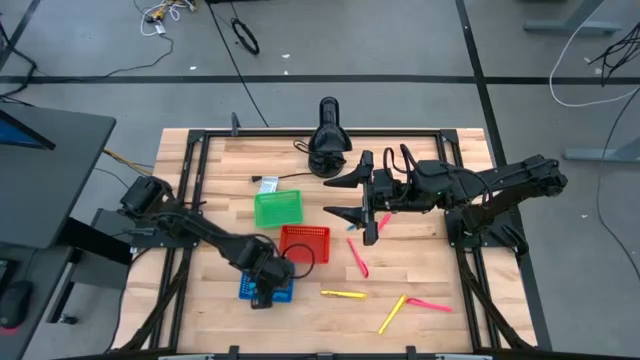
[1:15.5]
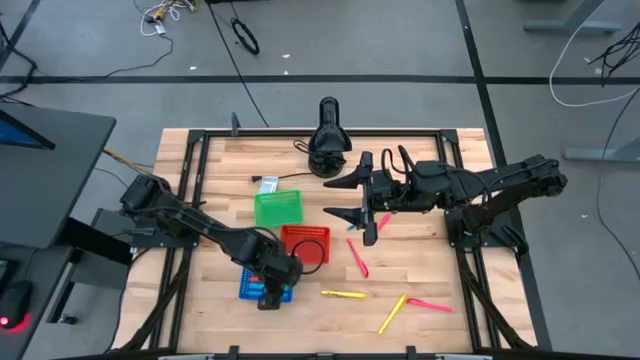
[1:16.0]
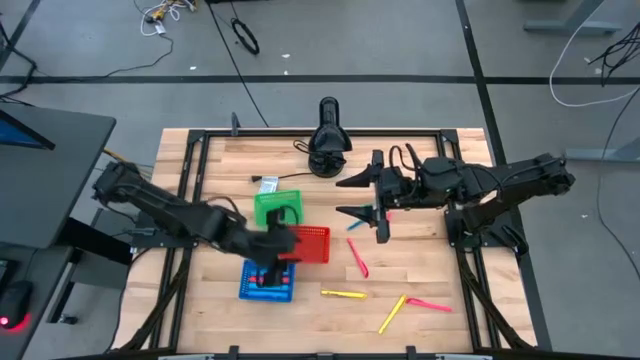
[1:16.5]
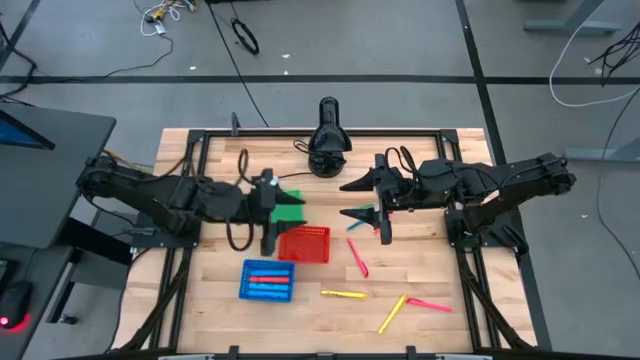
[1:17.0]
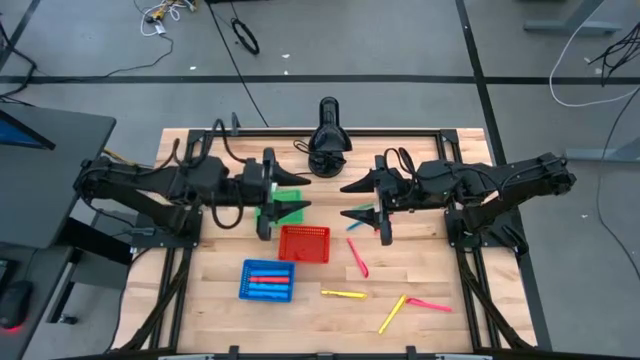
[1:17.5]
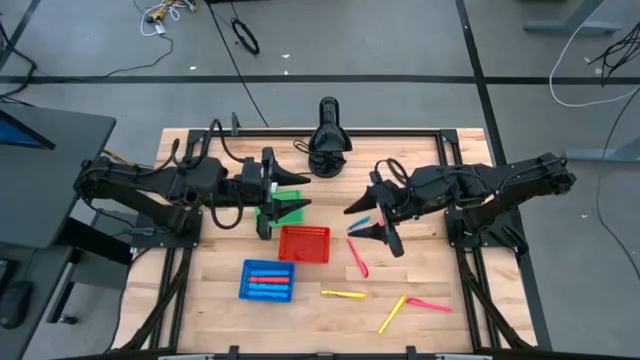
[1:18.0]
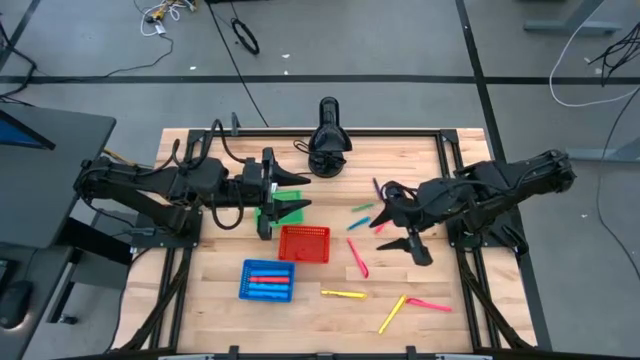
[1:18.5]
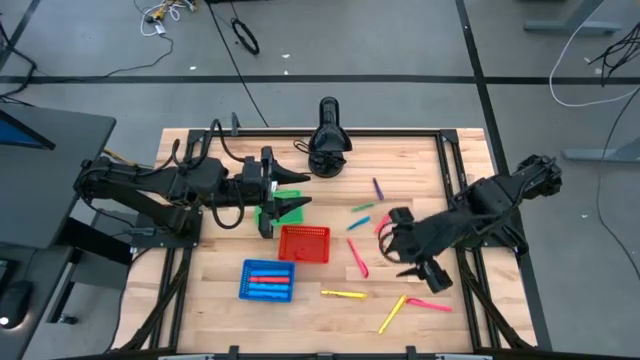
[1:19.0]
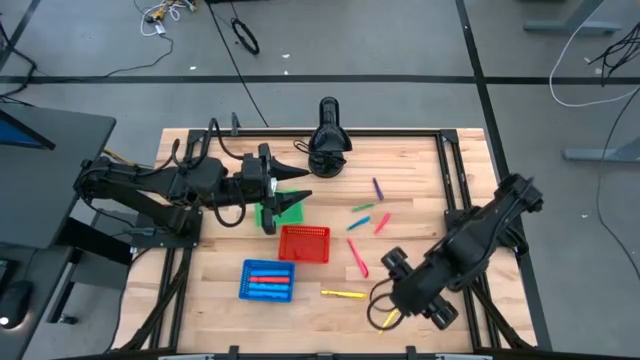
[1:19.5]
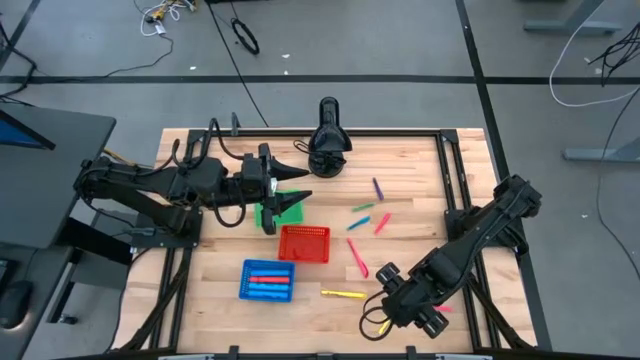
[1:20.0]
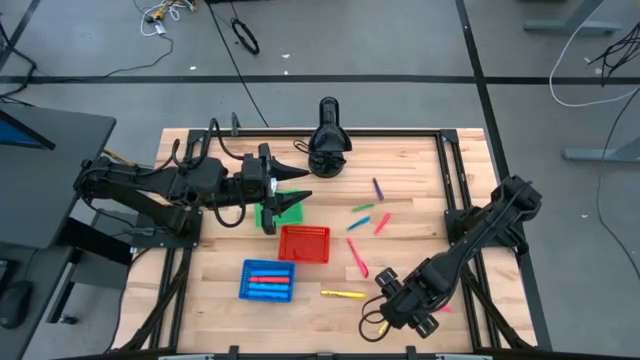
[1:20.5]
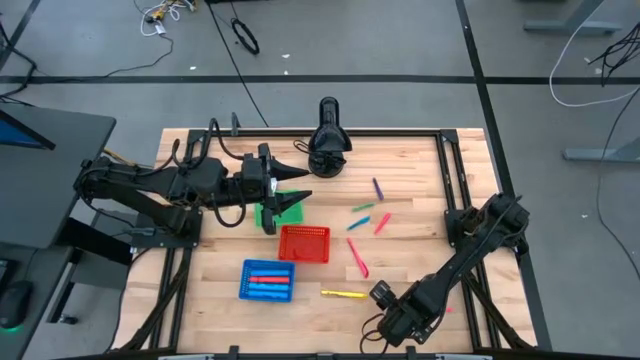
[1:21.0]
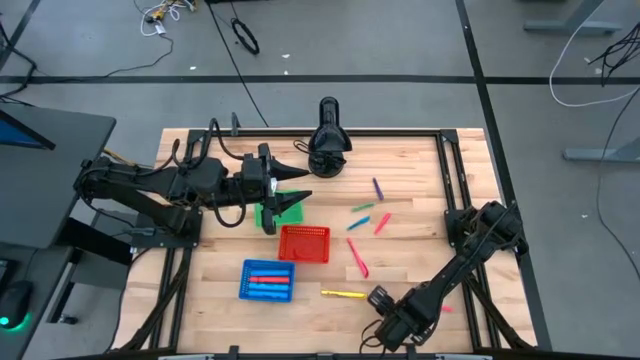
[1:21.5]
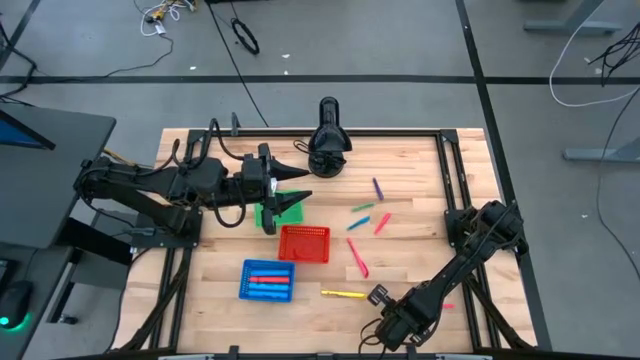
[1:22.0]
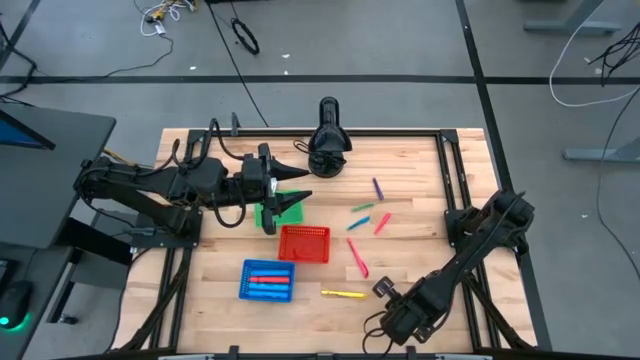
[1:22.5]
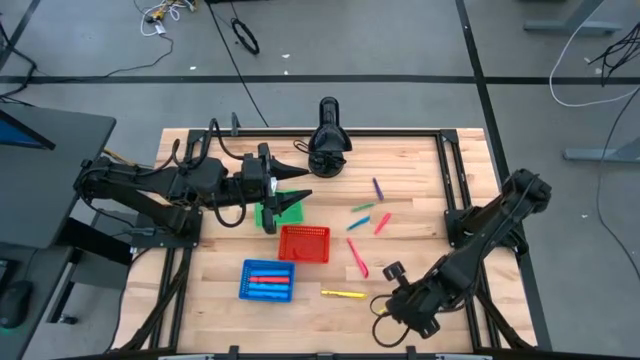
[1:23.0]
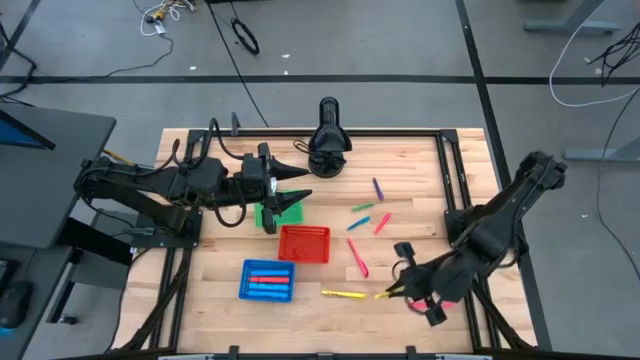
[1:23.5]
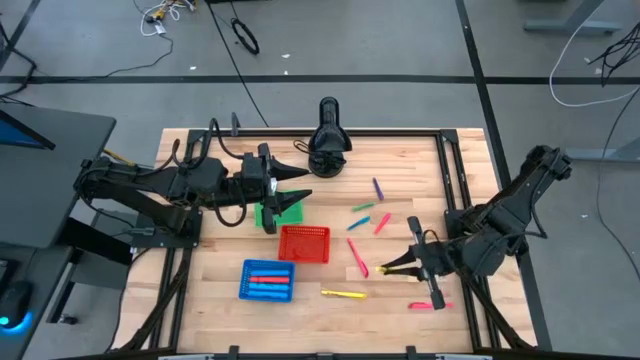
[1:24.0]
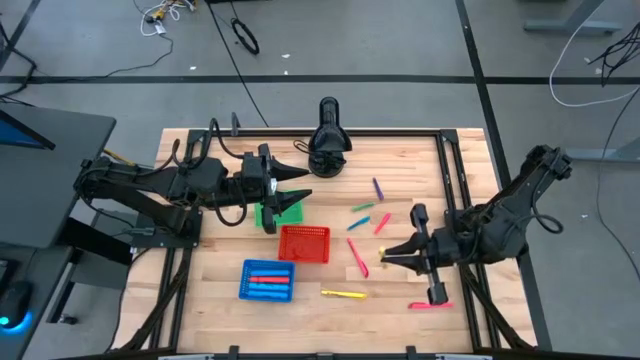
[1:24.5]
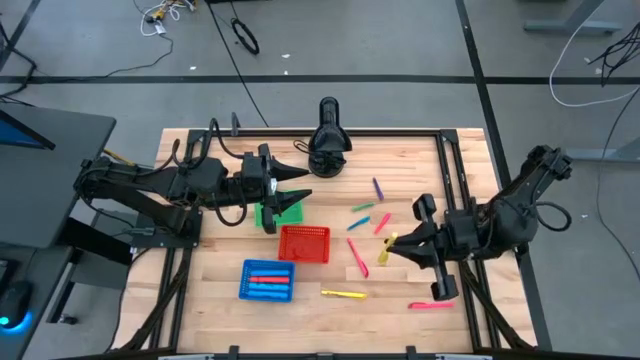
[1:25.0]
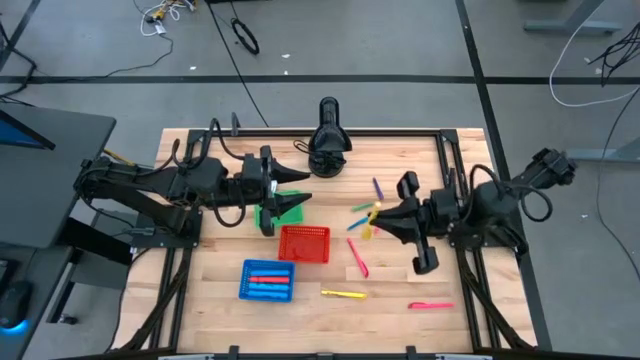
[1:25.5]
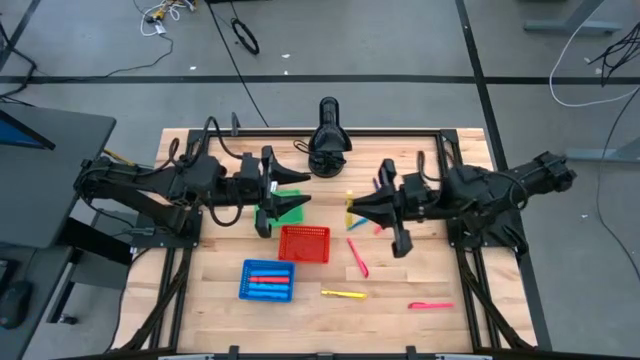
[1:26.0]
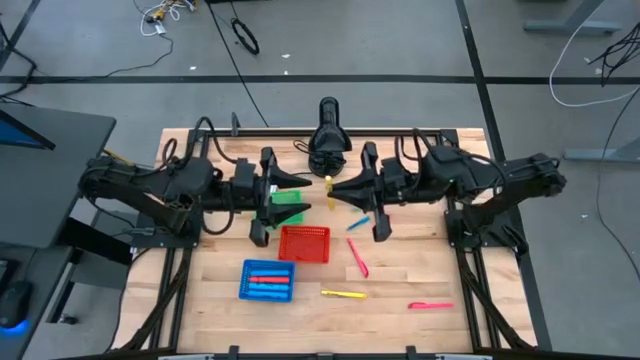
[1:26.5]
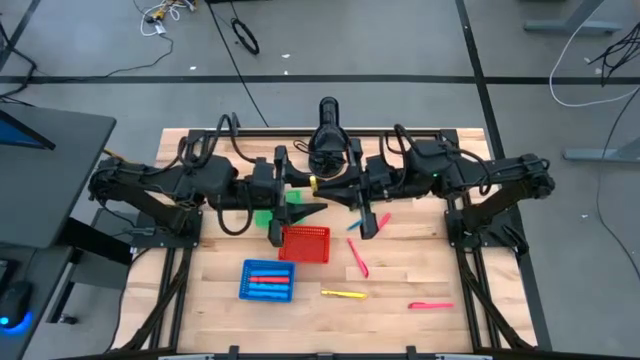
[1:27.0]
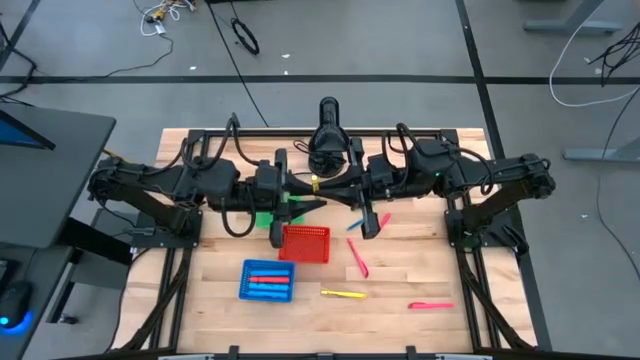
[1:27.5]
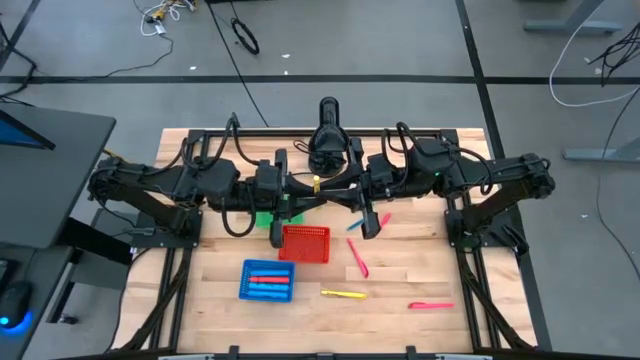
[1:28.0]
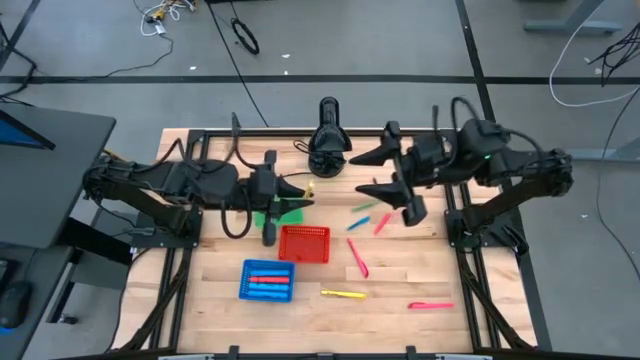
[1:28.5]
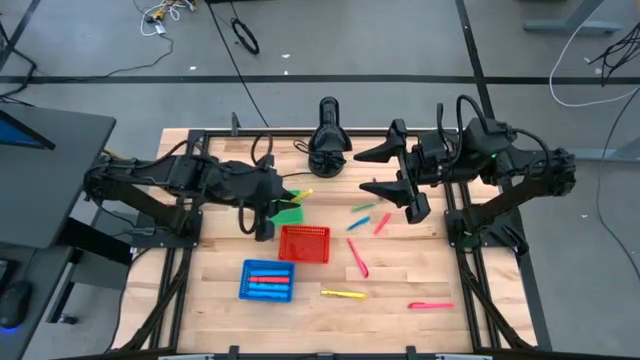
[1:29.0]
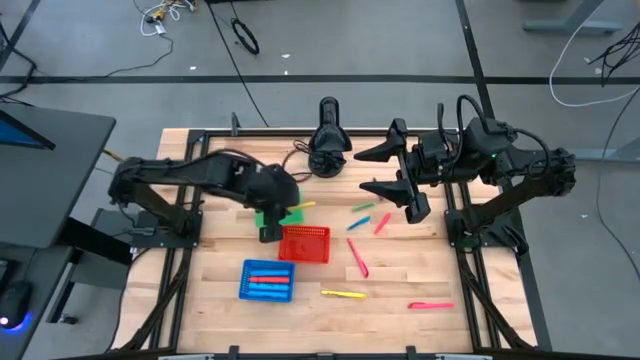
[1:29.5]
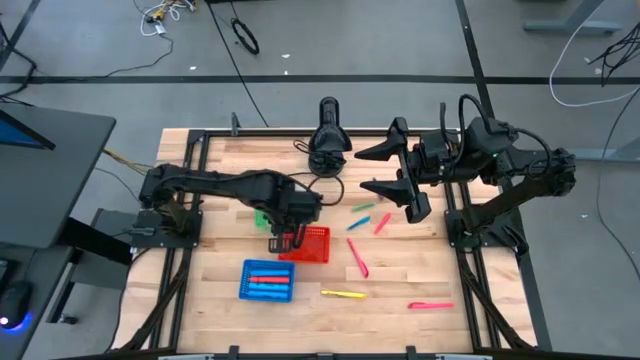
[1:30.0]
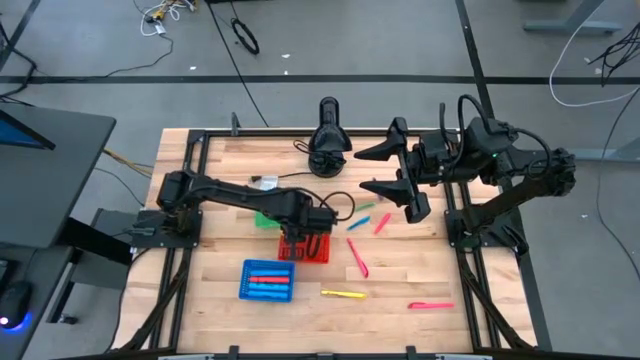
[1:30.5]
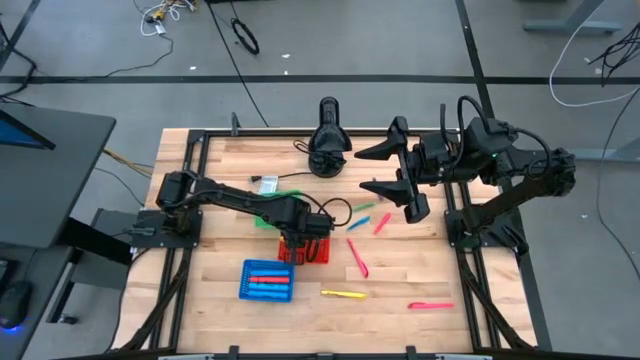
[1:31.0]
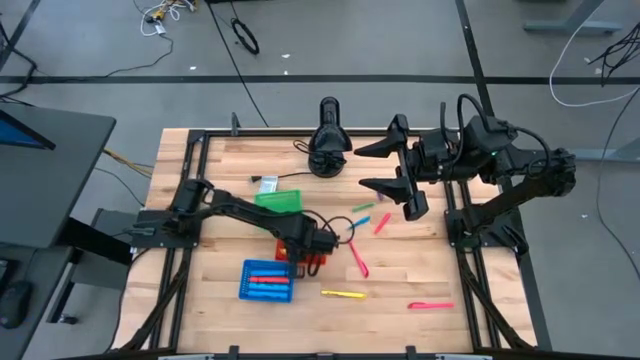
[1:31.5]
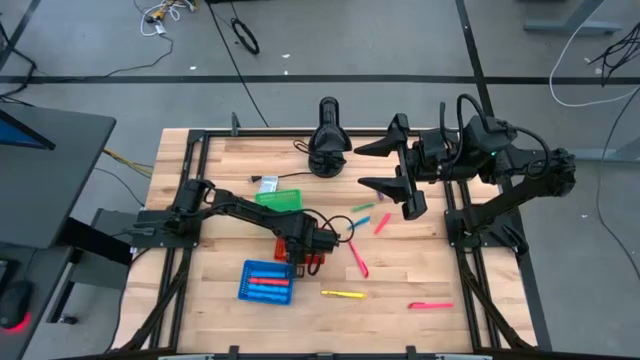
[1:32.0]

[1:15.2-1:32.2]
Task: Pick & Place Markers
Put the right yellow marker pen into the red bin

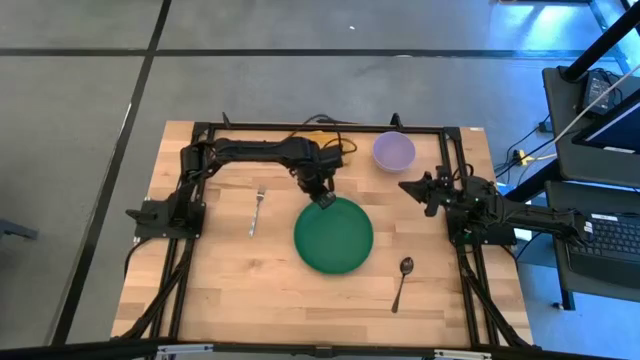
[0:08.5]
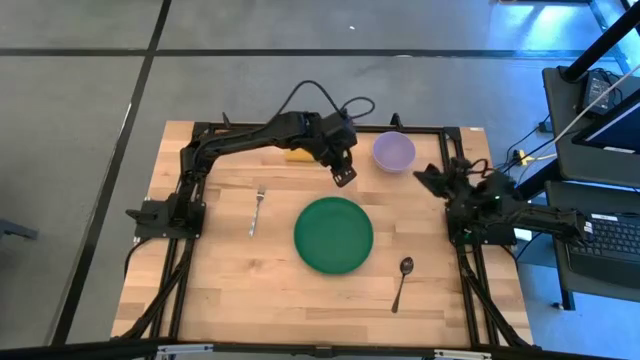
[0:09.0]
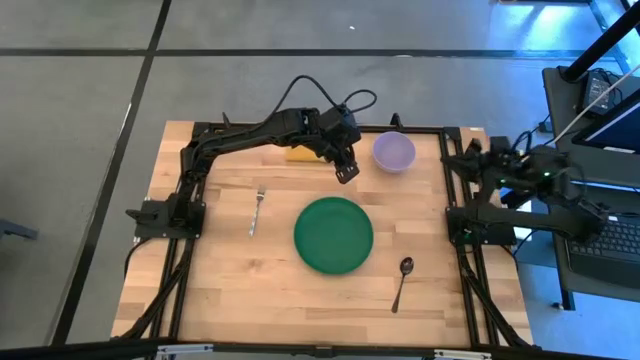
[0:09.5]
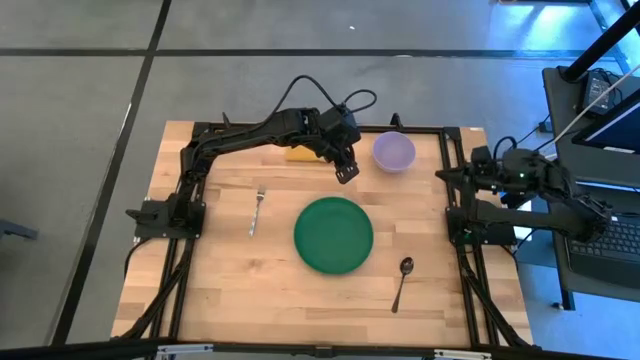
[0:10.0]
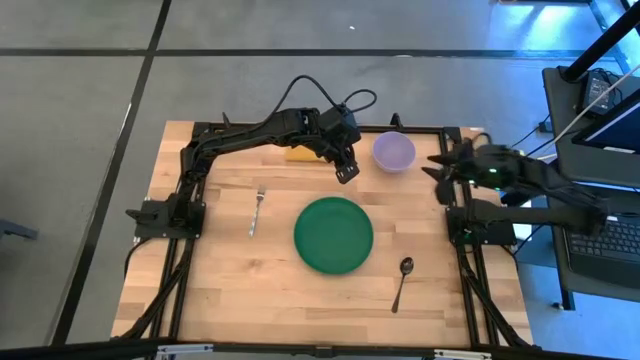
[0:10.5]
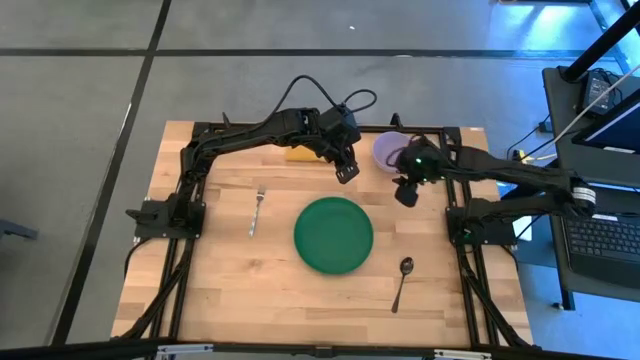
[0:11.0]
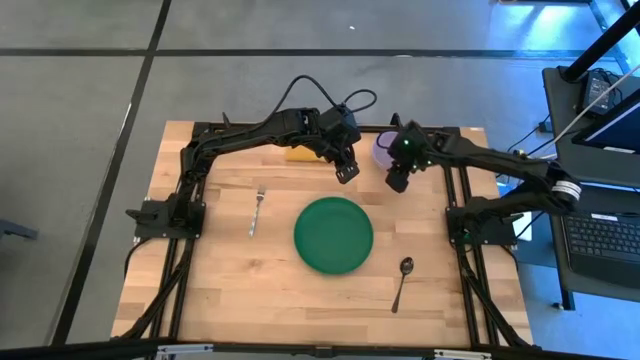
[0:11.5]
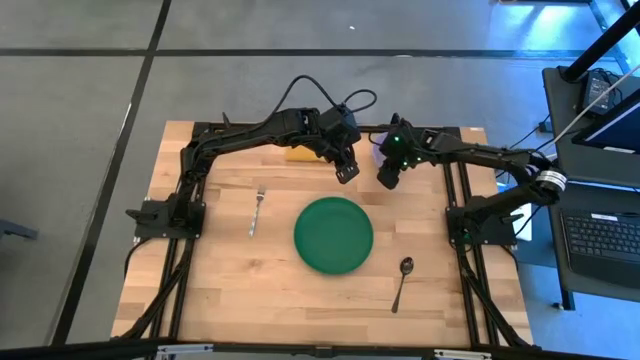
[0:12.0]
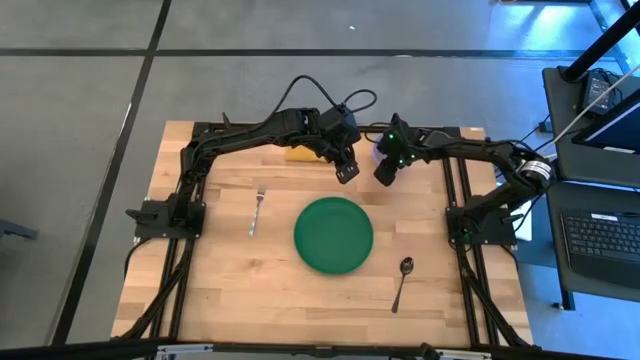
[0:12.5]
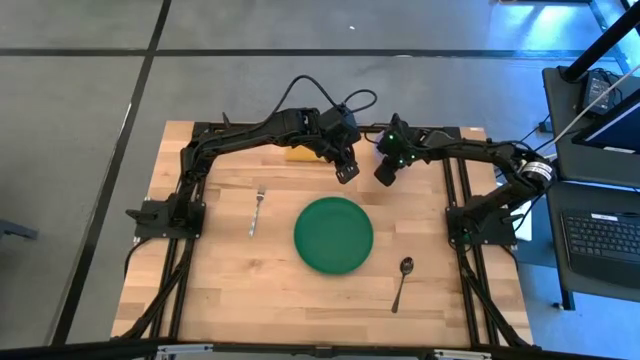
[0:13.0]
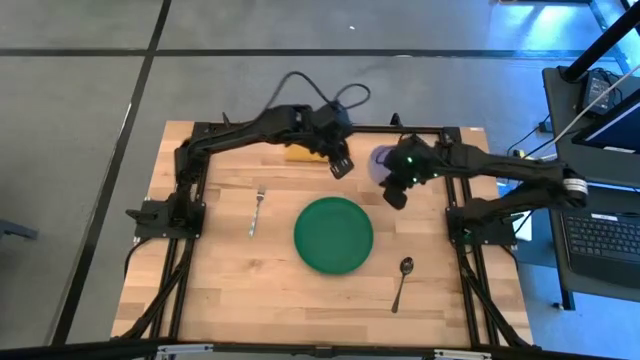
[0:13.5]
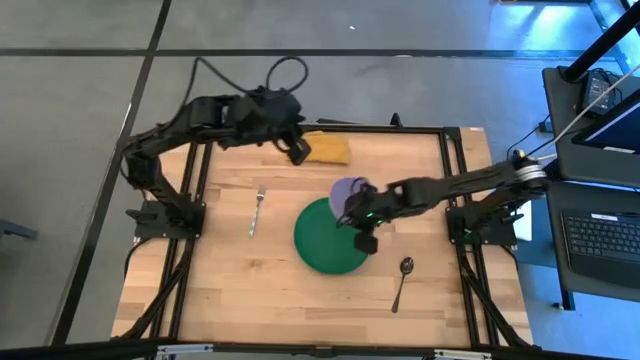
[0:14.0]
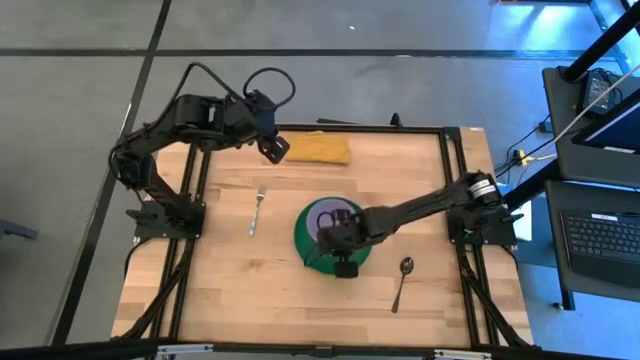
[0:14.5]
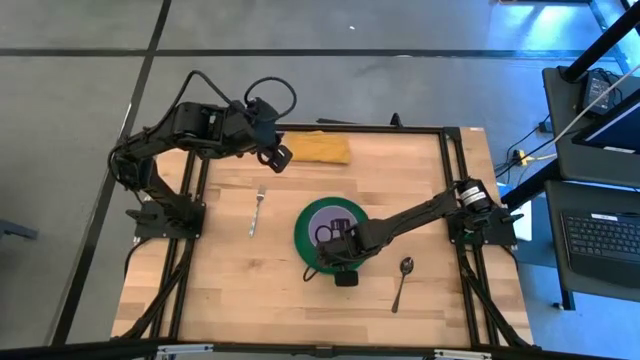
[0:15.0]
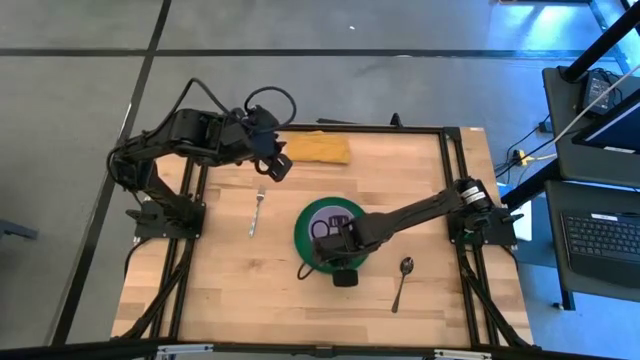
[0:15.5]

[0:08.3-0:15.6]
Task: Set table place
Put the white bowl on the green plate
